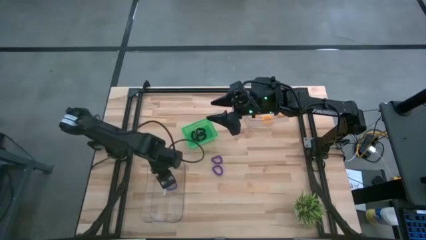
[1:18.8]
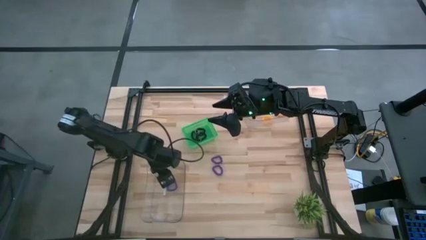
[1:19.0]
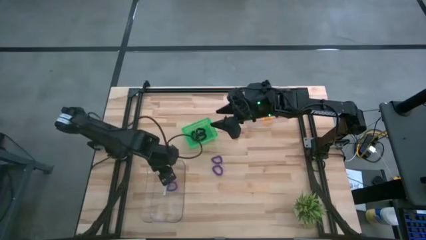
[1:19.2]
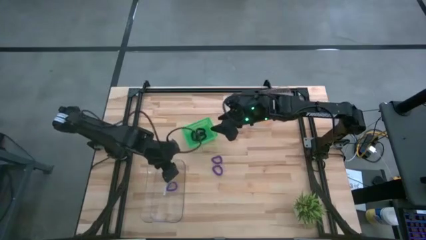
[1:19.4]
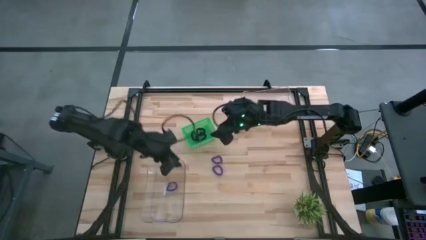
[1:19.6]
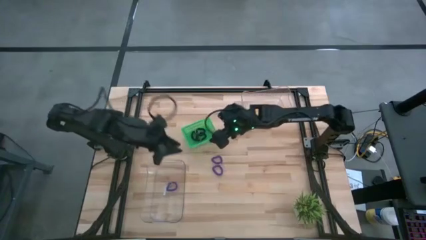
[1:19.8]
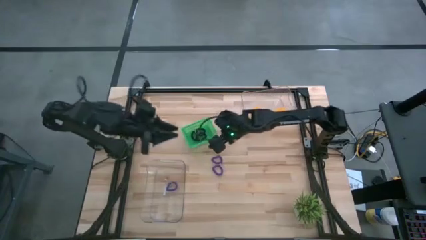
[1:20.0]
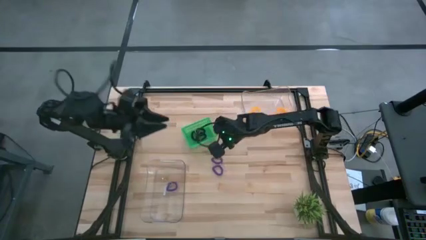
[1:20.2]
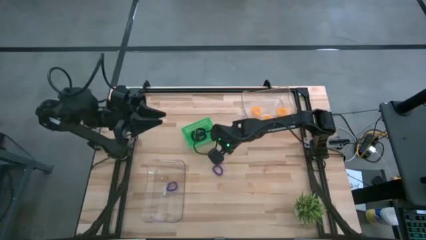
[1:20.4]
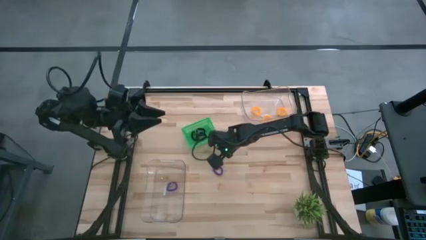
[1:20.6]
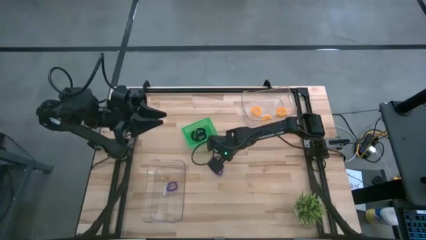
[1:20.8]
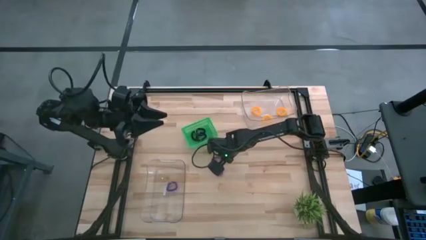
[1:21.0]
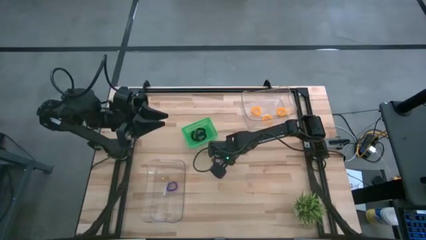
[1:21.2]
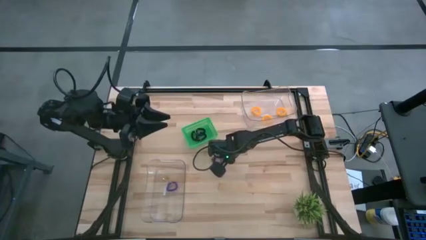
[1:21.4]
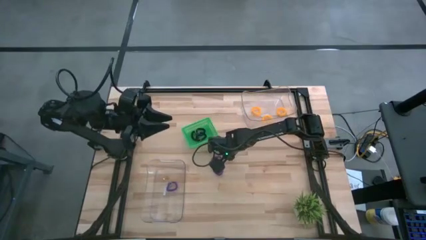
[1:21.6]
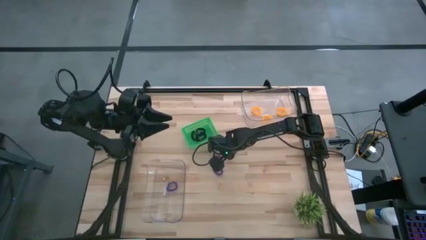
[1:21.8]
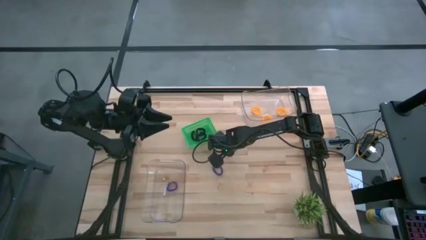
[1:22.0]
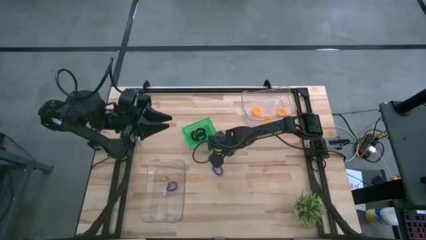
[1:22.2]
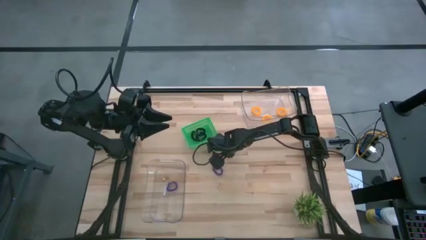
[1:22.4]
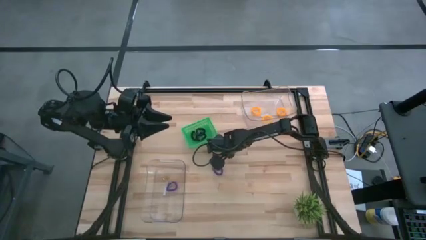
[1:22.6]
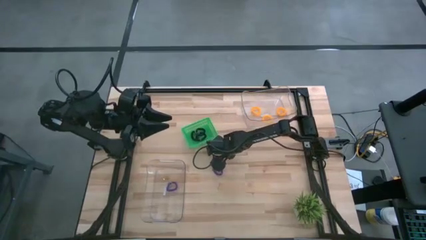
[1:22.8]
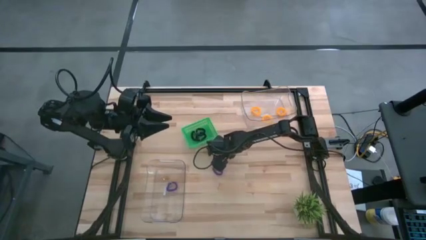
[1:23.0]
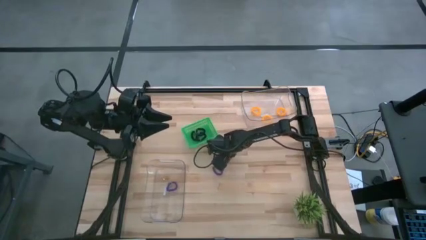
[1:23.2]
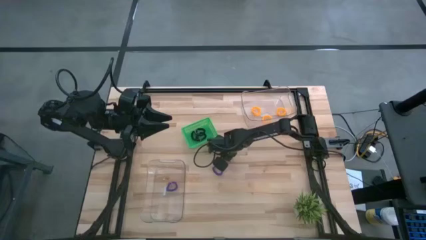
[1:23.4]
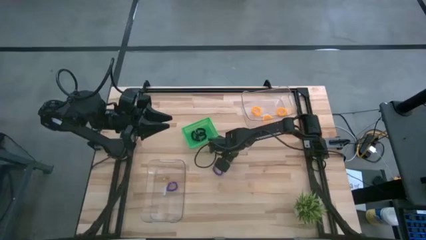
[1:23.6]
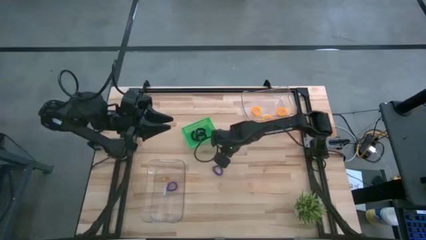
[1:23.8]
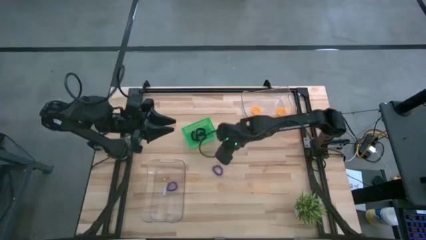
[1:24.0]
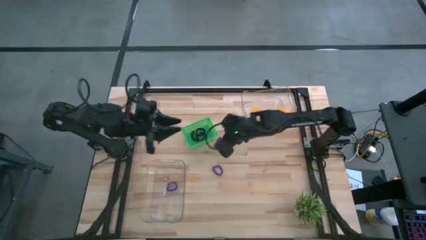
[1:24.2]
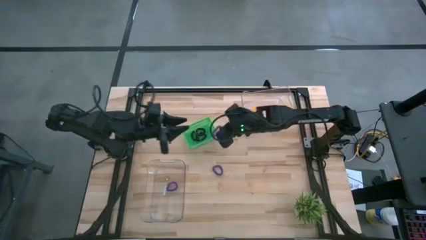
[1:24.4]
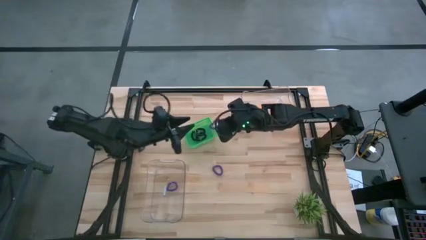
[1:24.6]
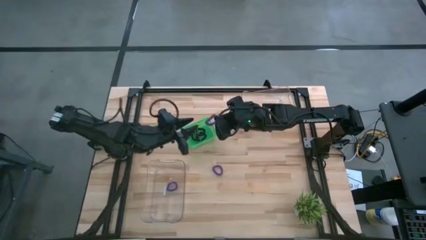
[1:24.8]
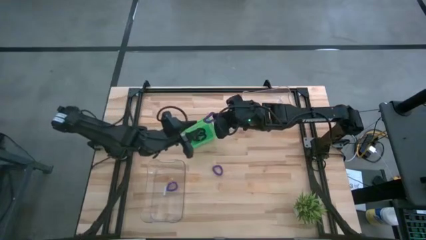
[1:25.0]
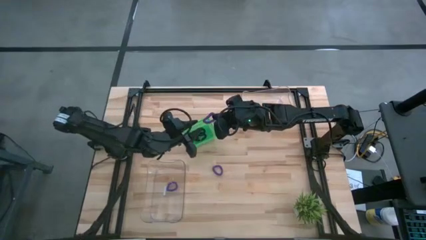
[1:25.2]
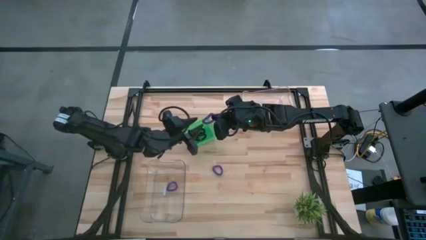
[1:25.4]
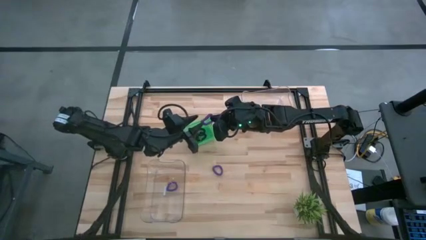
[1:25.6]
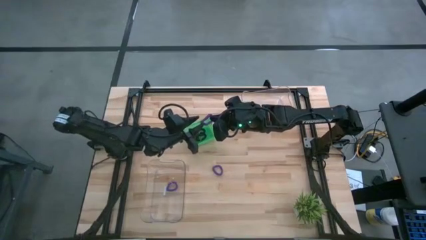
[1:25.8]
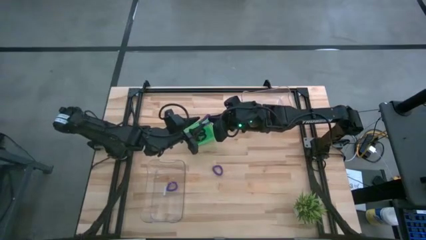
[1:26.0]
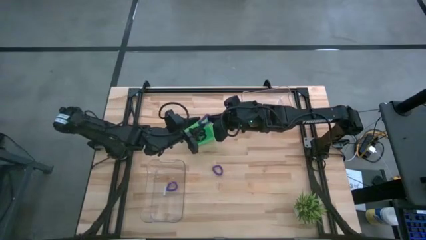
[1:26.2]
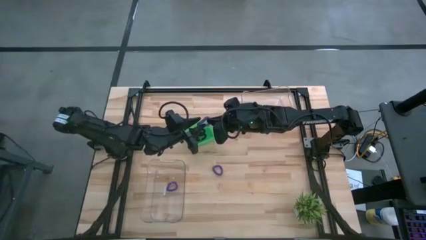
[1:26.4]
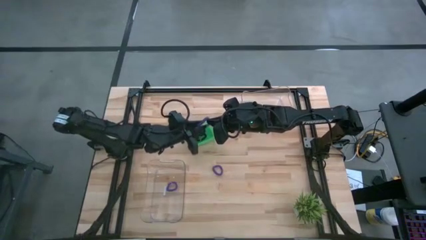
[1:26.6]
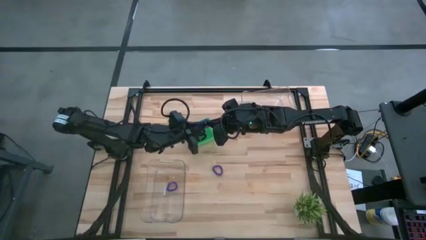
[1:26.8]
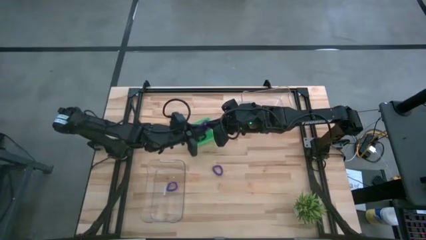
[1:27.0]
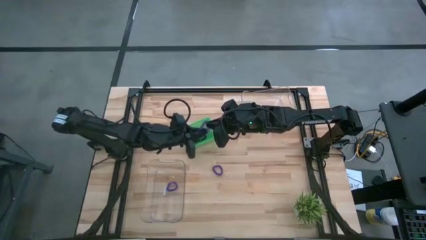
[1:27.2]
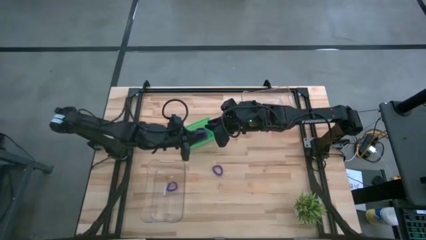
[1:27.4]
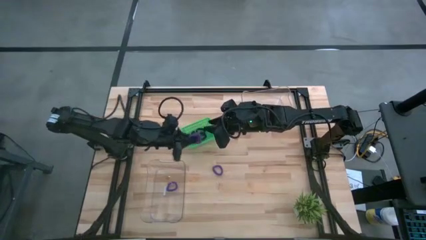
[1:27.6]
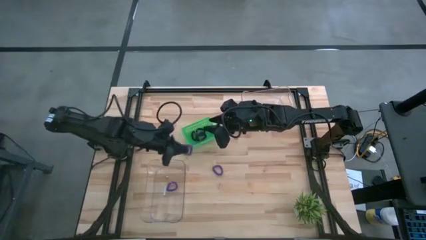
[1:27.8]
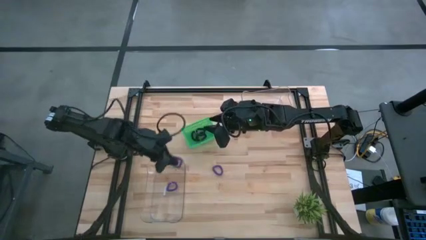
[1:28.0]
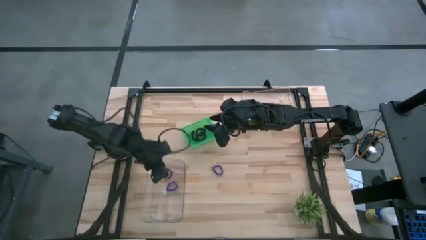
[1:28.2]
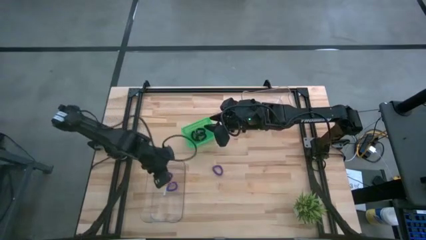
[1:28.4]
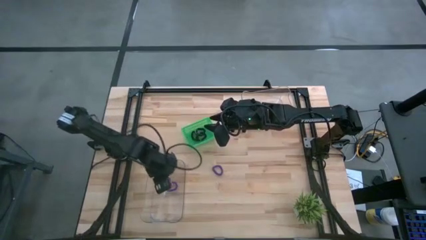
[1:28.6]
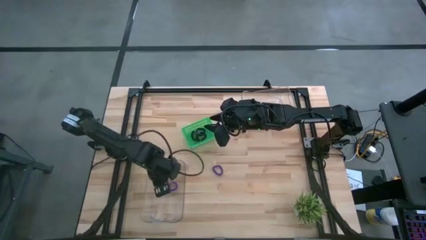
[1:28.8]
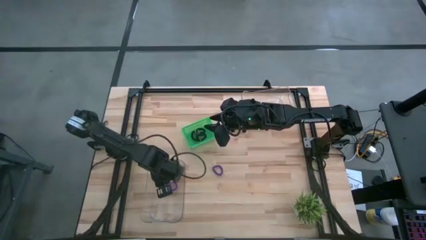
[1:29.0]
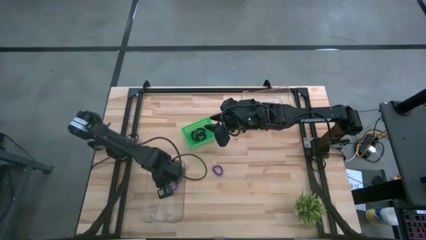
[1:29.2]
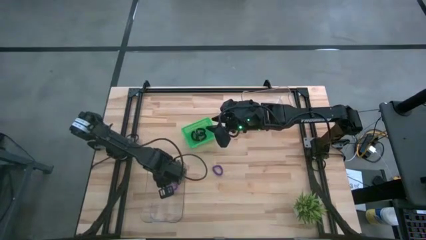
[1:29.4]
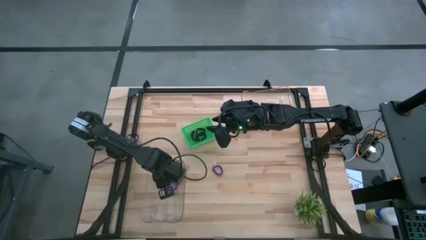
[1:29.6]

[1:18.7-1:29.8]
Task: Sort spring keychains
Put the top purple spring keychain into the bottom transparent bin
